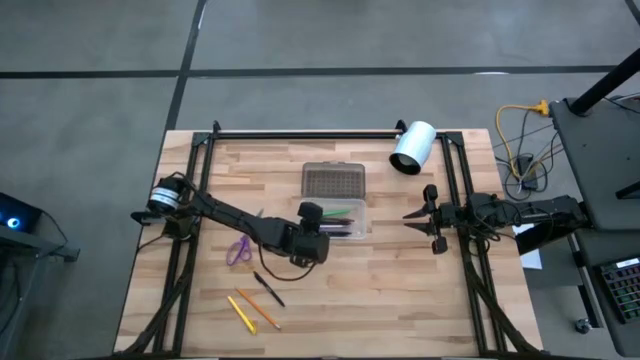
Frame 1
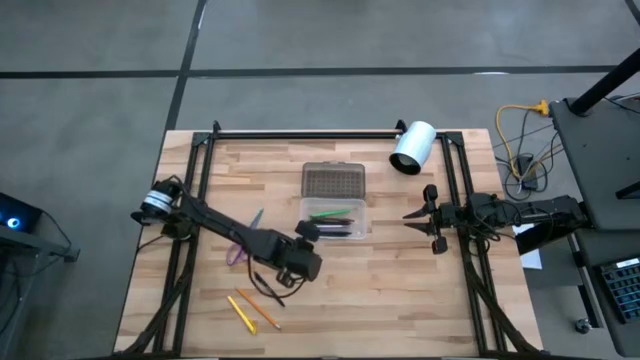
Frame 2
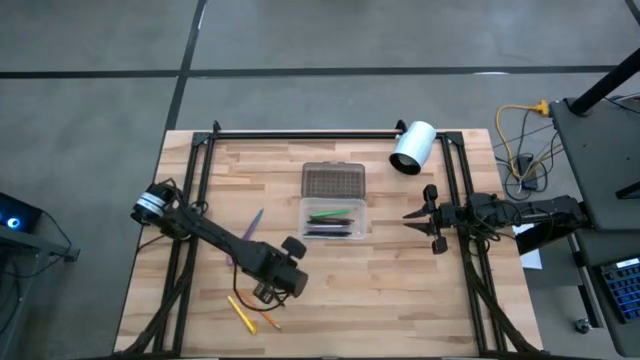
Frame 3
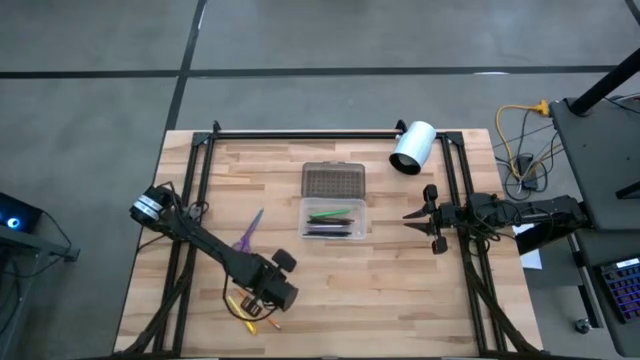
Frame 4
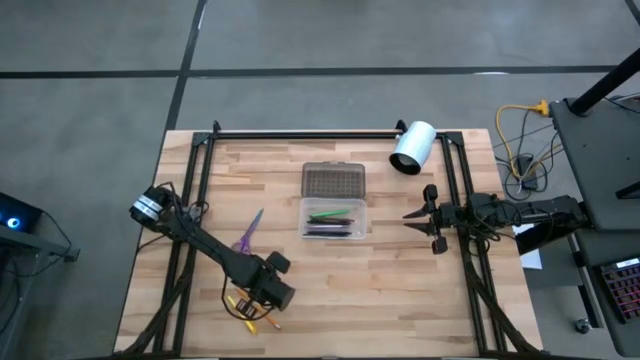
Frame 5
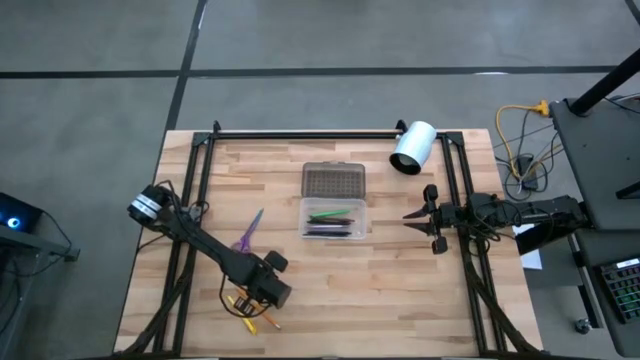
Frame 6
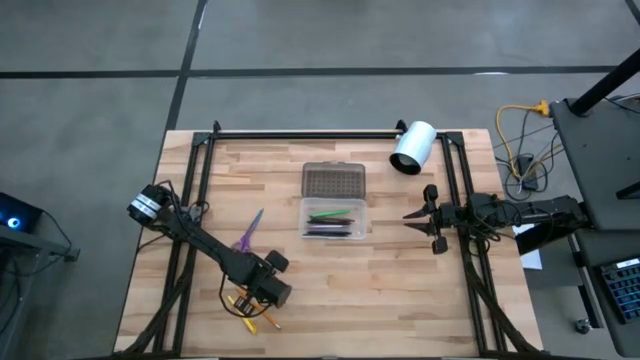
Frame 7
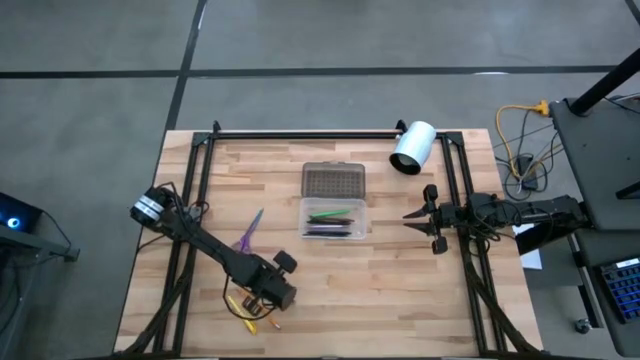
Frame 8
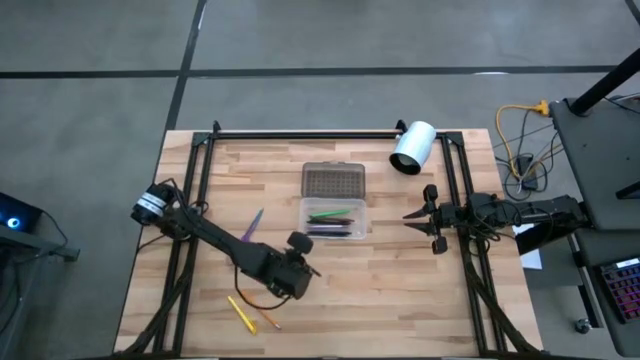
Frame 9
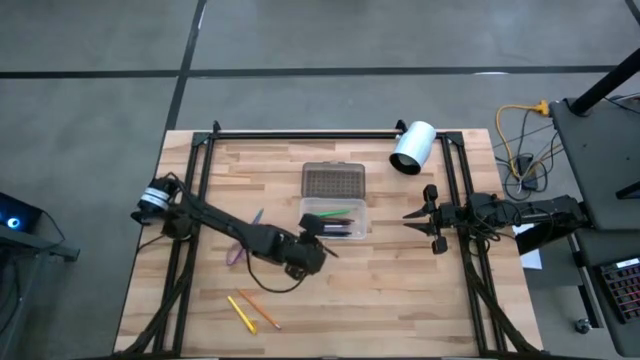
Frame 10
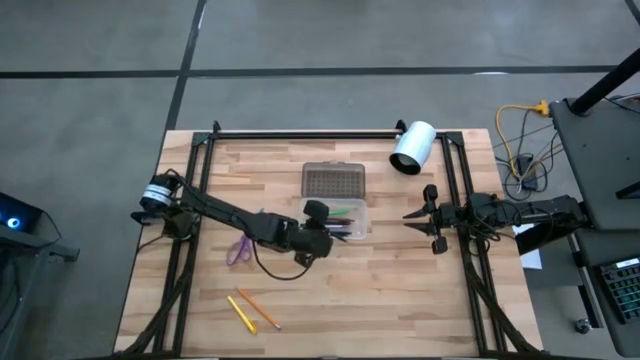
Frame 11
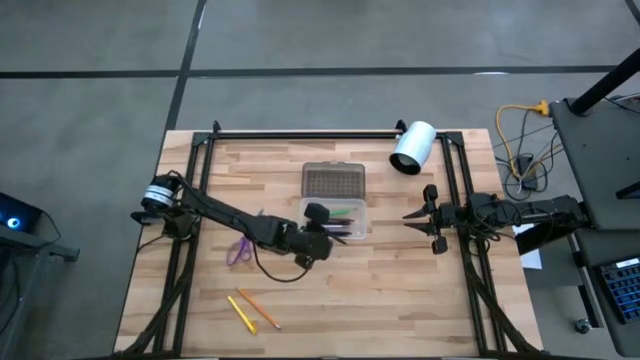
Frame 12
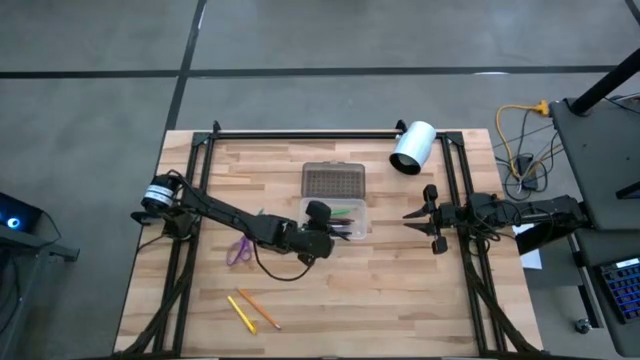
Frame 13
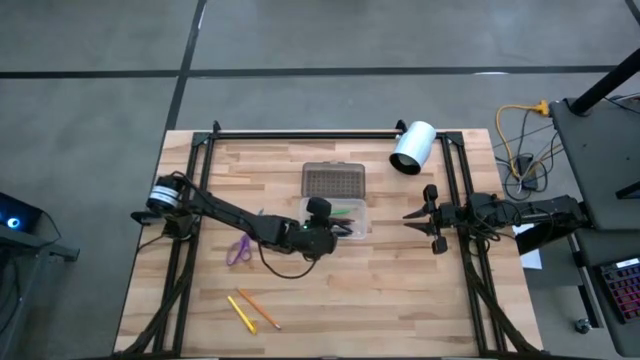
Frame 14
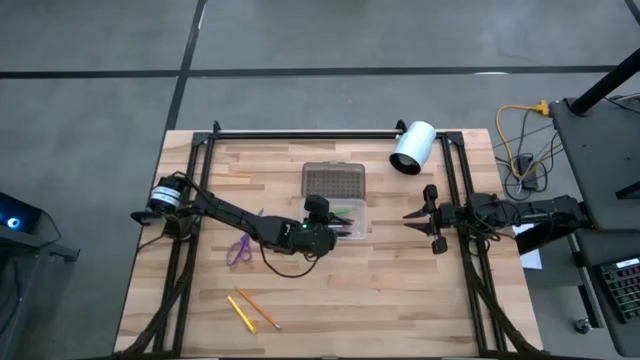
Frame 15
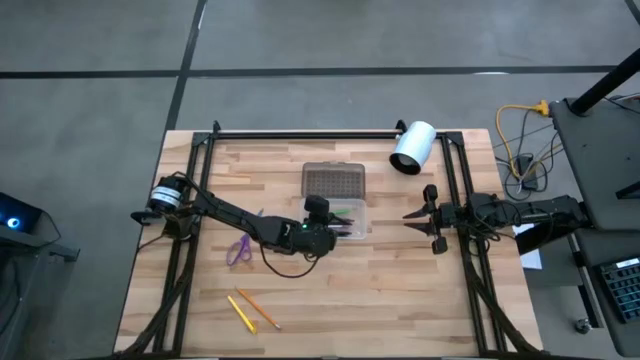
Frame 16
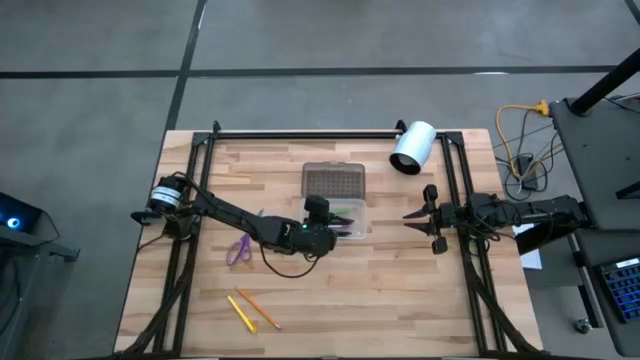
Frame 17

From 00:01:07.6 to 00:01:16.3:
Task: Pick & place school supplies into a supply box
Put the black pen into the white and black supply box

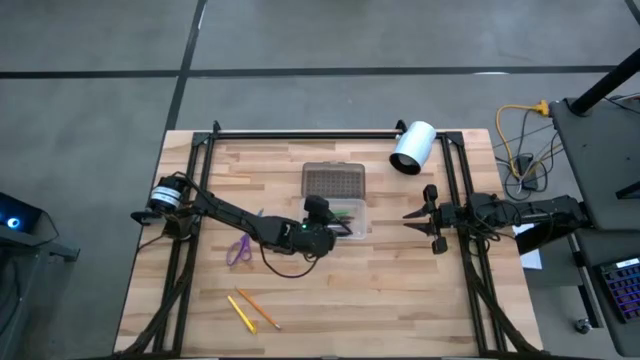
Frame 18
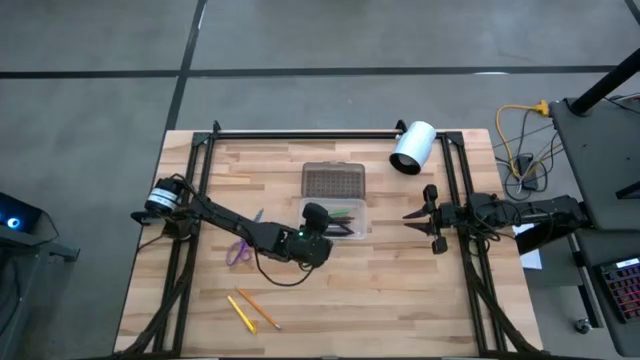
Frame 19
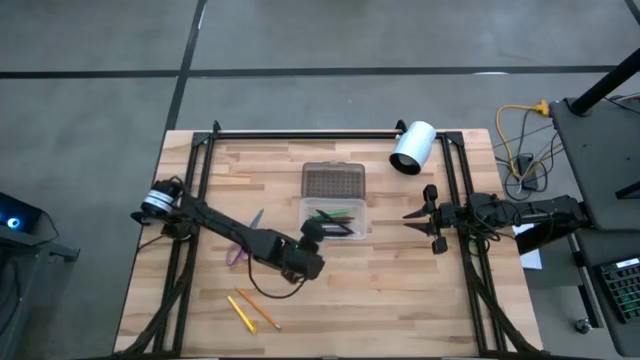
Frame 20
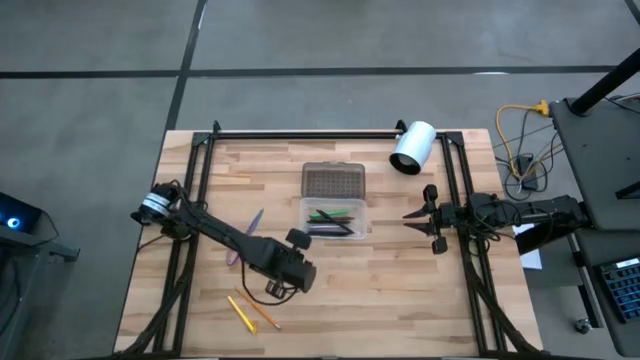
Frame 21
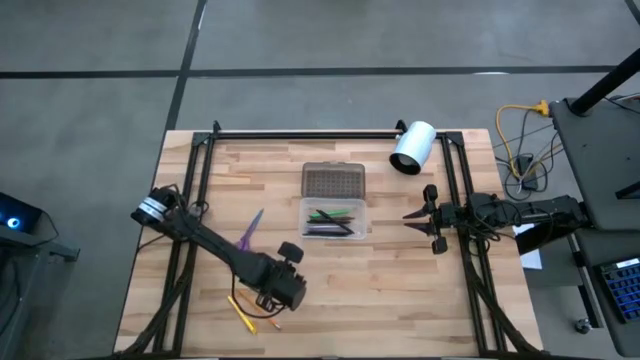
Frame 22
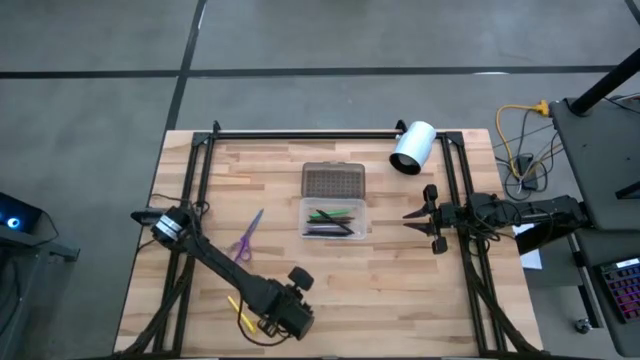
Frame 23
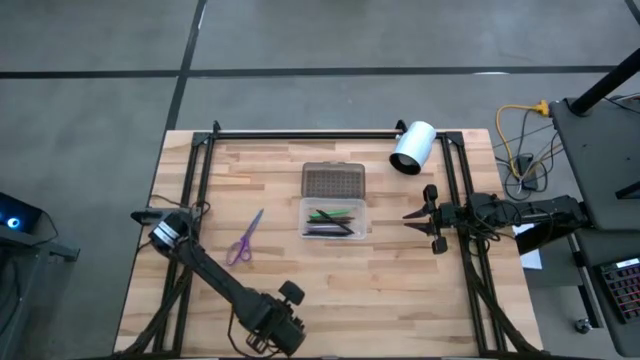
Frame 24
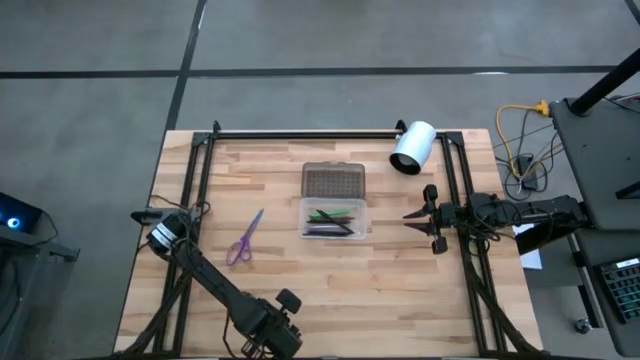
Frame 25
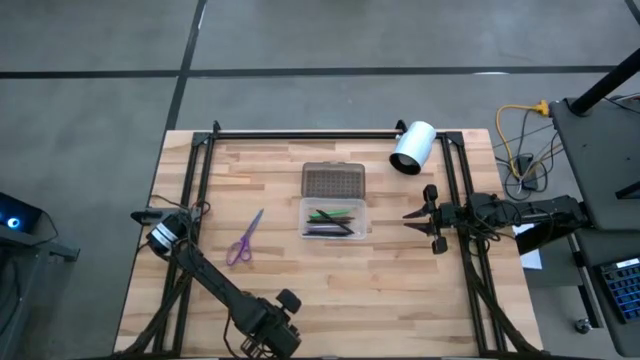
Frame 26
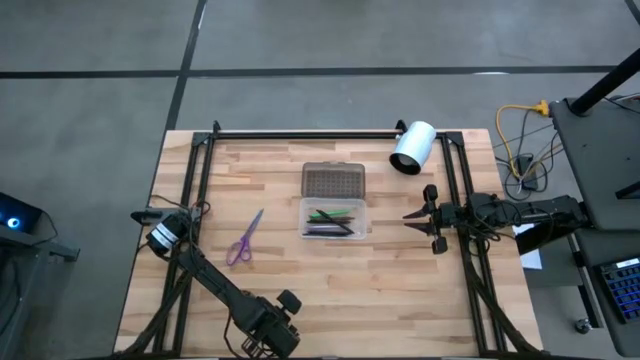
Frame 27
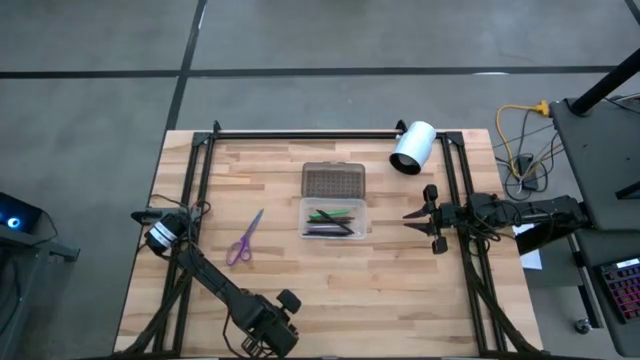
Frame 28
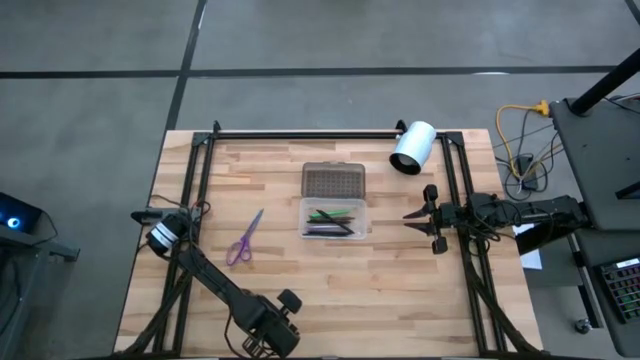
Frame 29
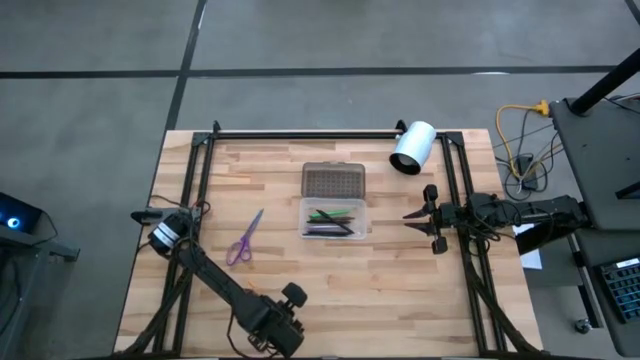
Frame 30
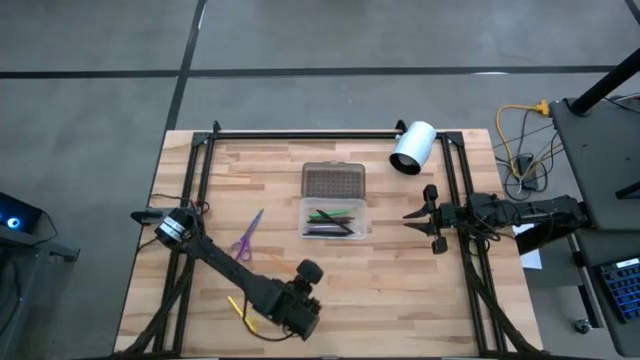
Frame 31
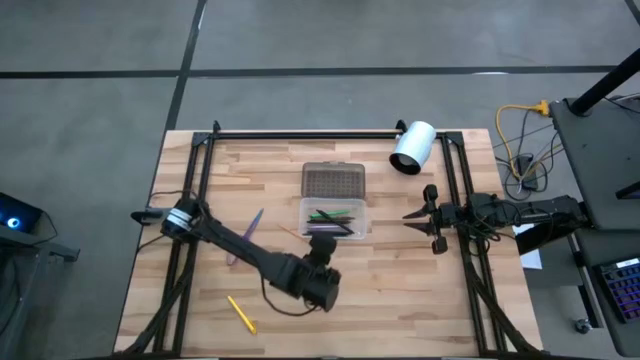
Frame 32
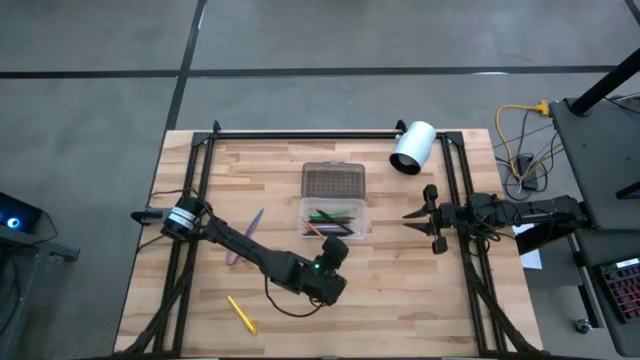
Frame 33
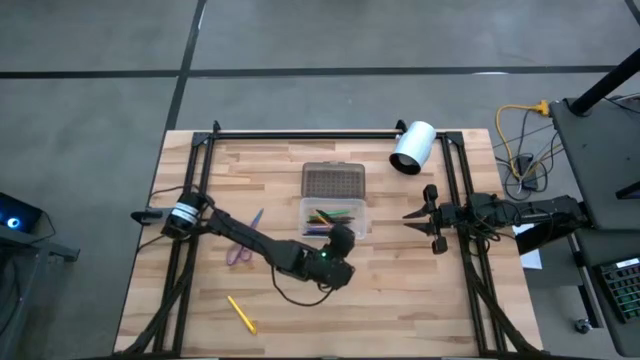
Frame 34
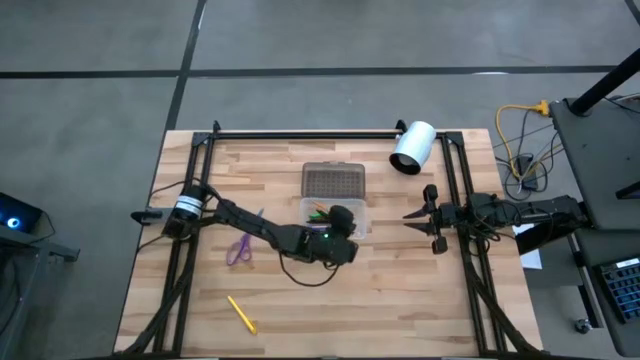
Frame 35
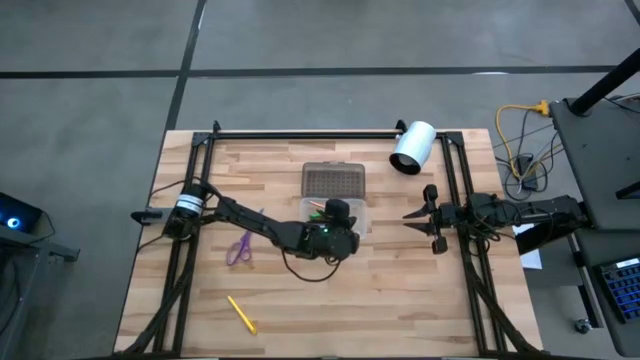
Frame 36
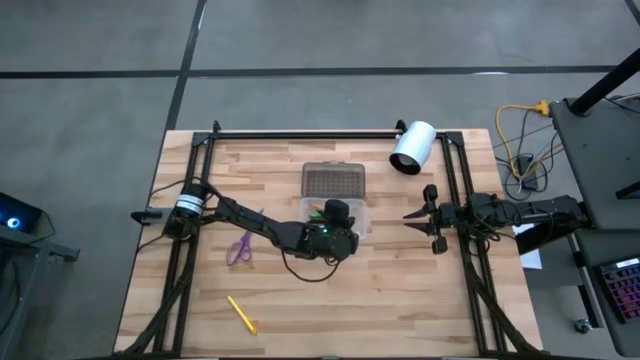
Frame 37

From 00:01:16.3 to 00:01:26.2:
Put the orange pencil into the white and black supply box

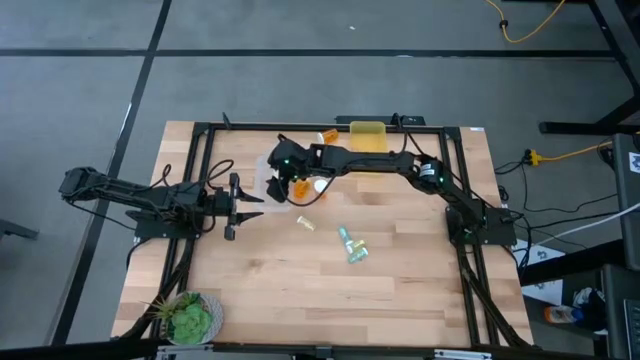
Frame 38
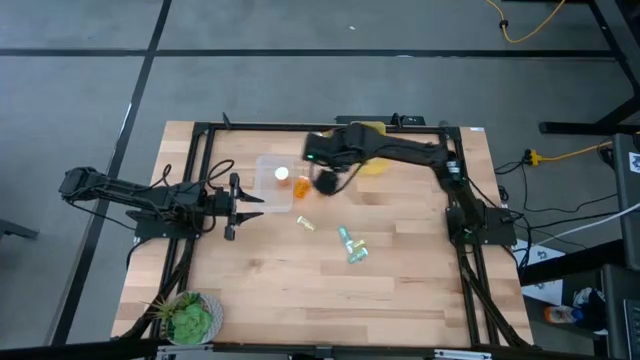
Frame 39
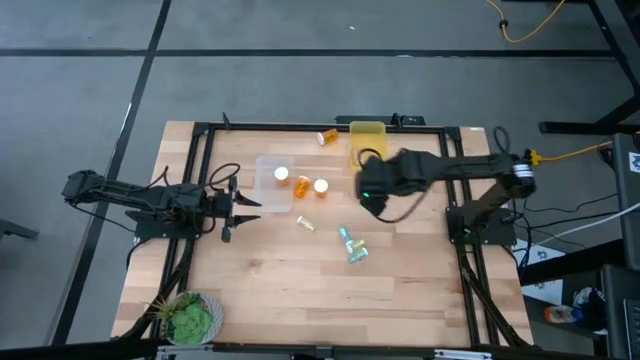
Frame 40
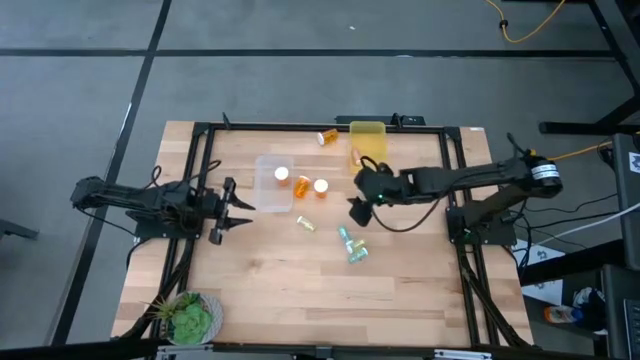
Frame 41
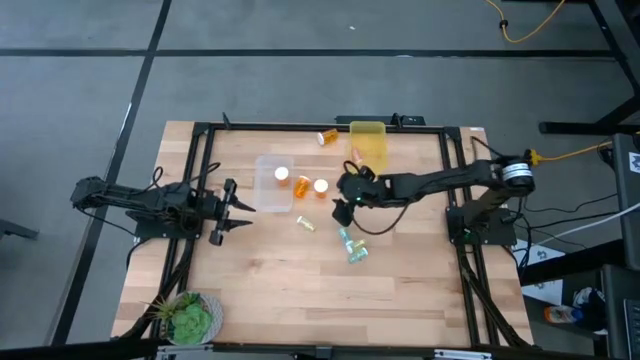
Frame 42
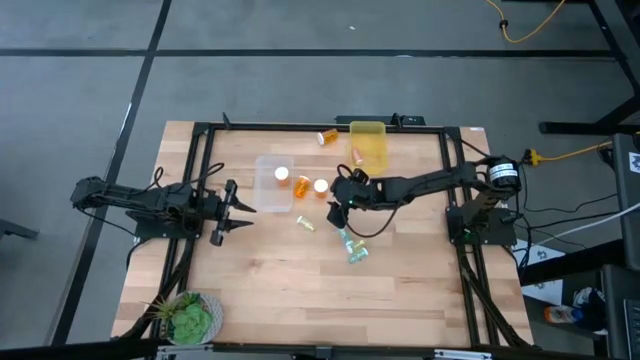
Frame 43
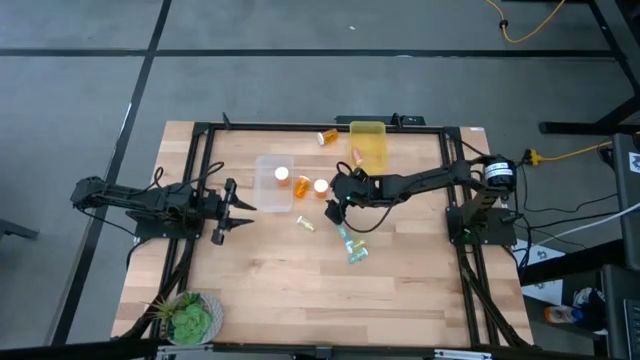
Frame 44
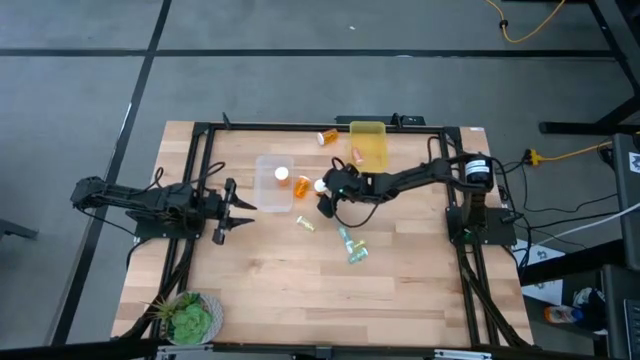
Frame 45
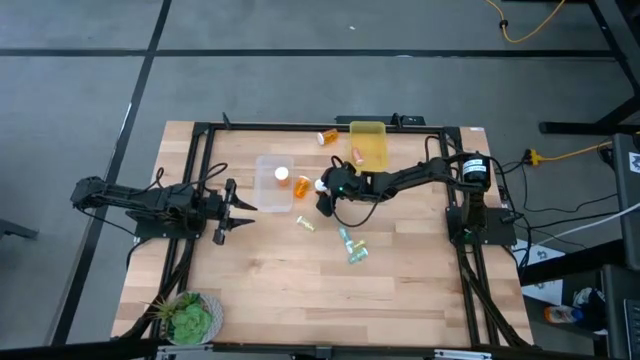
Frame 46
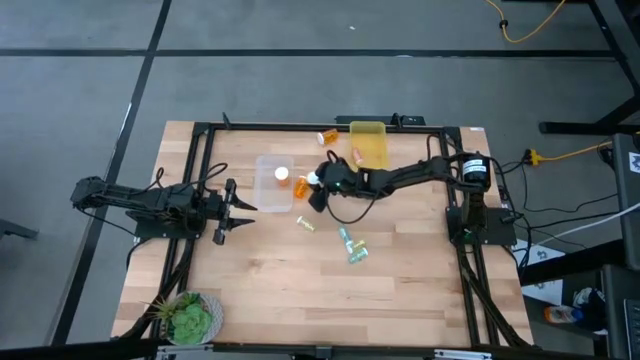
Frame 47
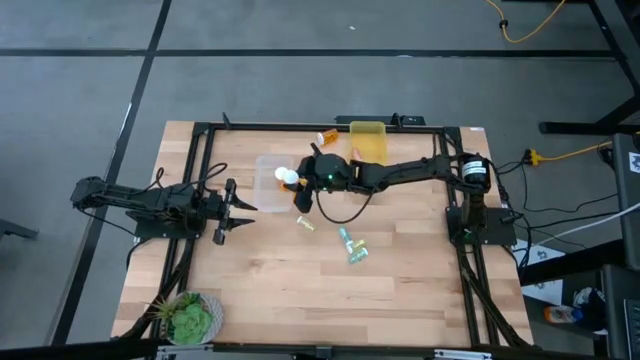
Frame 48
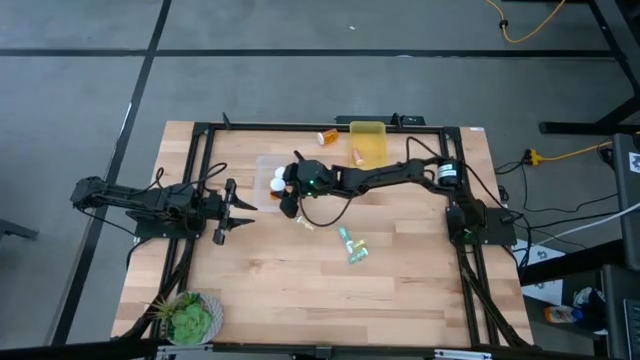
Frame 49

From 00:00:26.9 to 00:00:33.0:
Task: Pick and place medicine bottles into bin by pill shape (circle, oval)
Put the large orange pill bottle into the transparent bin
